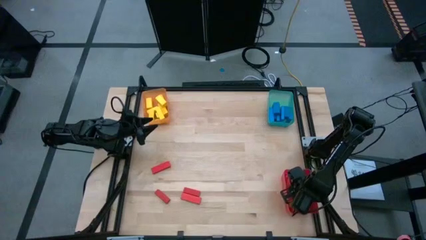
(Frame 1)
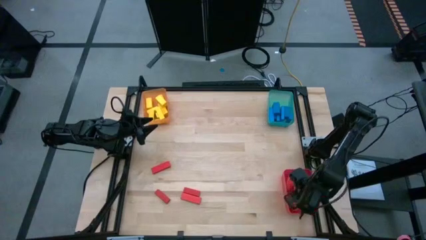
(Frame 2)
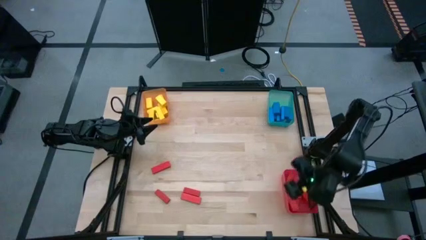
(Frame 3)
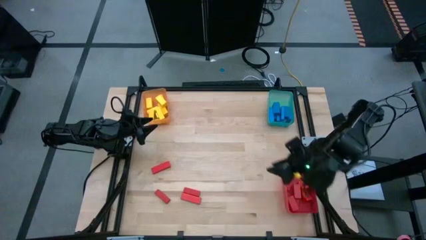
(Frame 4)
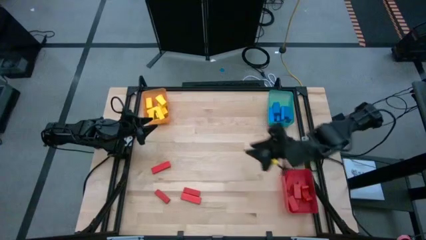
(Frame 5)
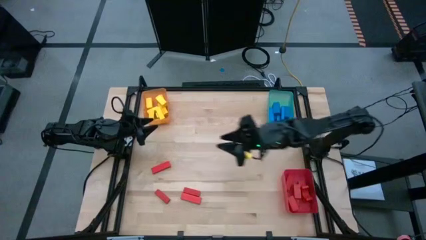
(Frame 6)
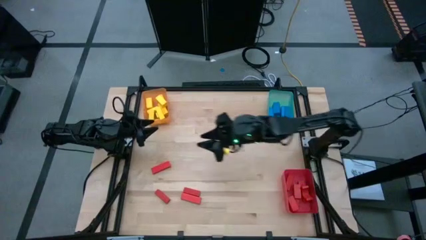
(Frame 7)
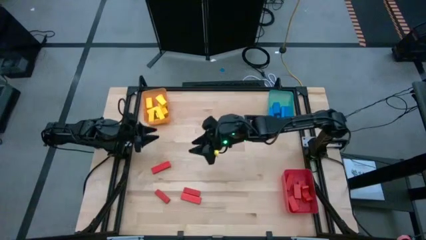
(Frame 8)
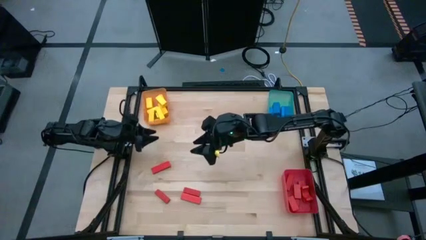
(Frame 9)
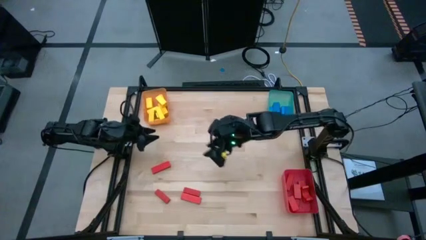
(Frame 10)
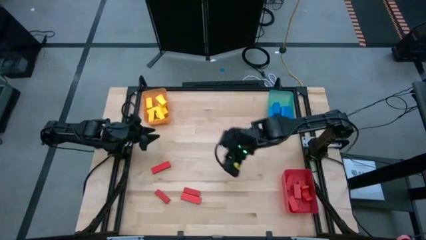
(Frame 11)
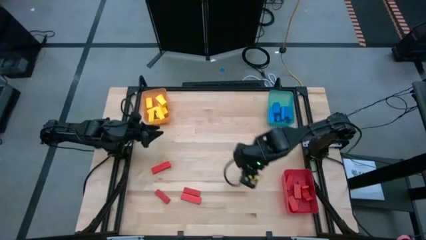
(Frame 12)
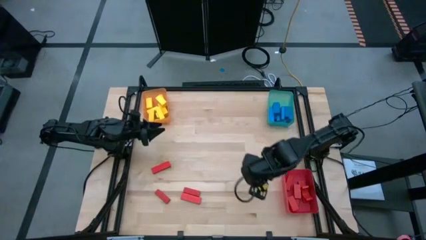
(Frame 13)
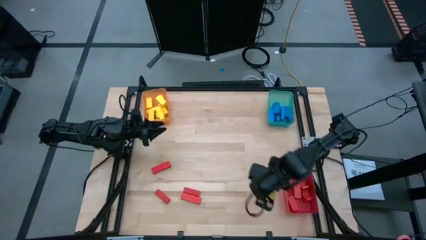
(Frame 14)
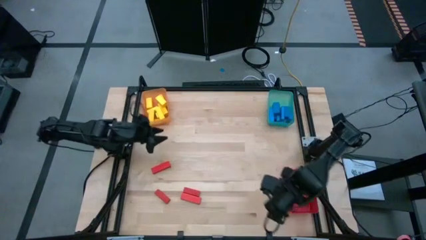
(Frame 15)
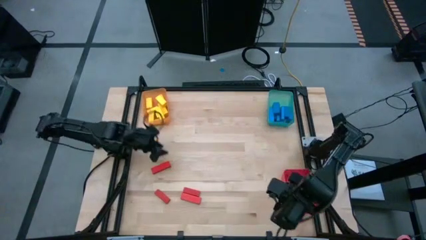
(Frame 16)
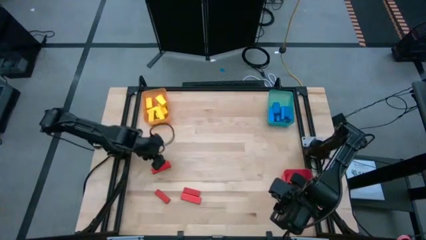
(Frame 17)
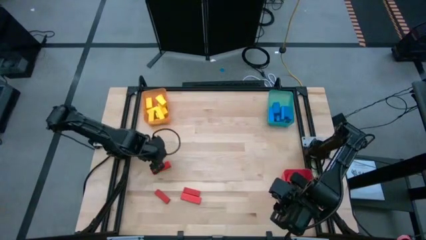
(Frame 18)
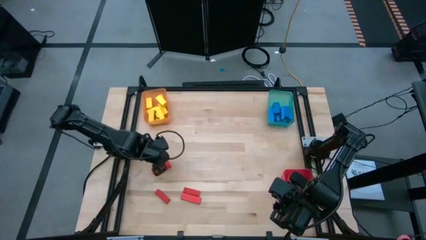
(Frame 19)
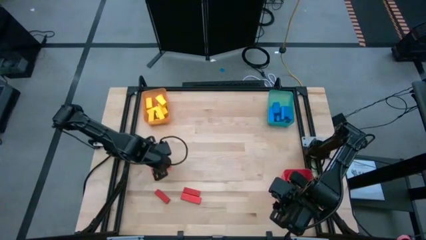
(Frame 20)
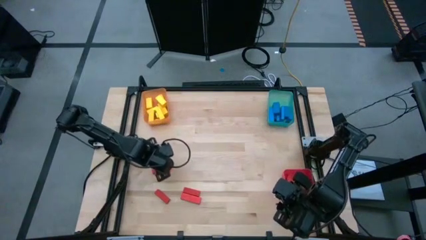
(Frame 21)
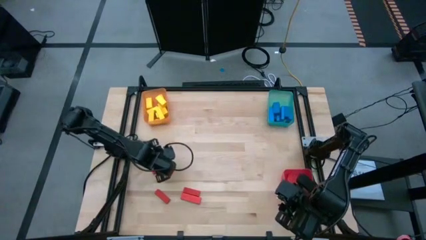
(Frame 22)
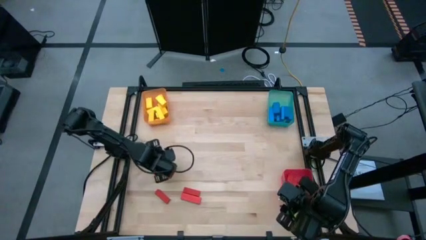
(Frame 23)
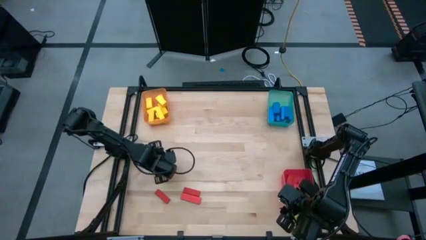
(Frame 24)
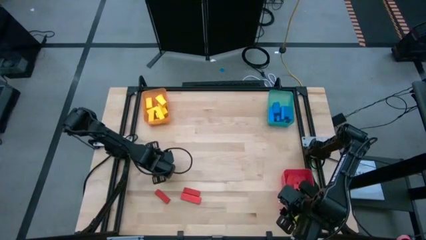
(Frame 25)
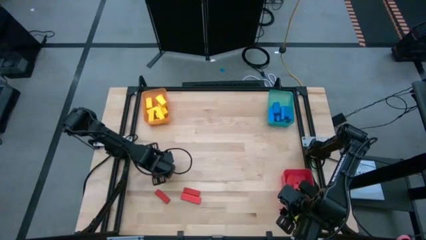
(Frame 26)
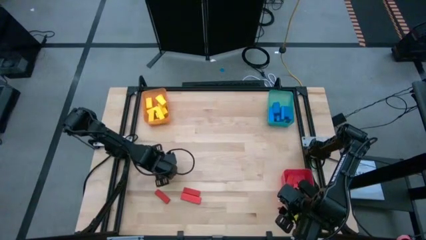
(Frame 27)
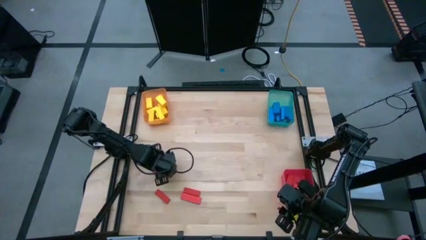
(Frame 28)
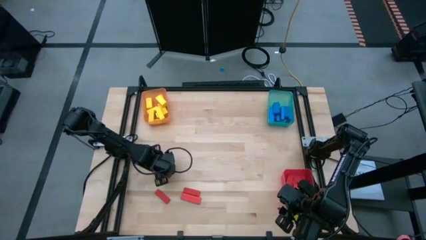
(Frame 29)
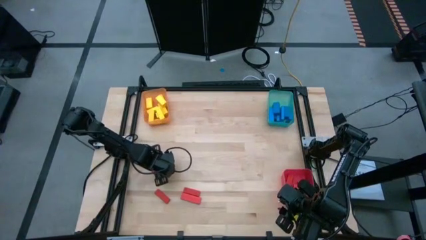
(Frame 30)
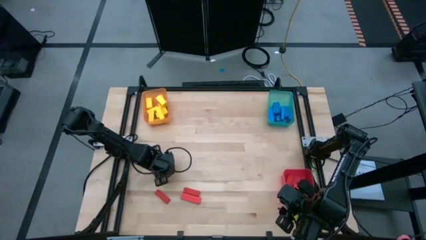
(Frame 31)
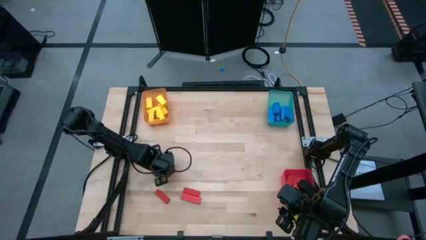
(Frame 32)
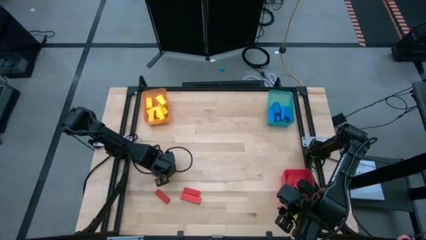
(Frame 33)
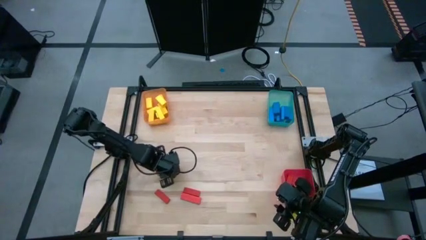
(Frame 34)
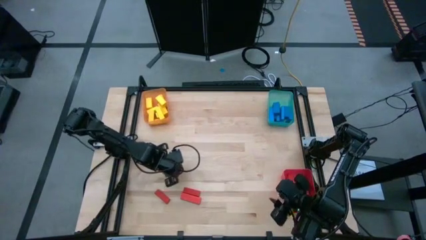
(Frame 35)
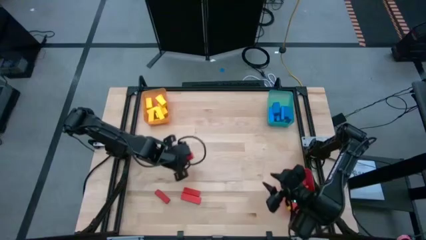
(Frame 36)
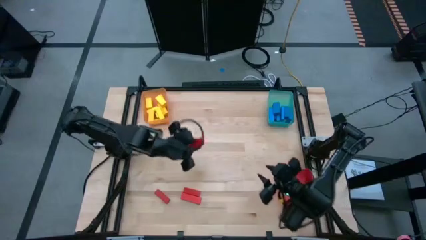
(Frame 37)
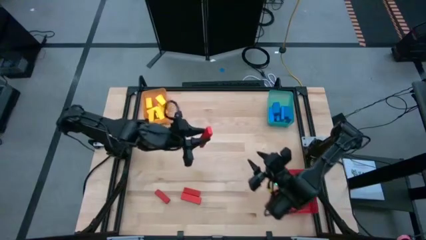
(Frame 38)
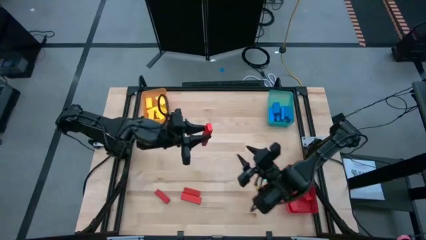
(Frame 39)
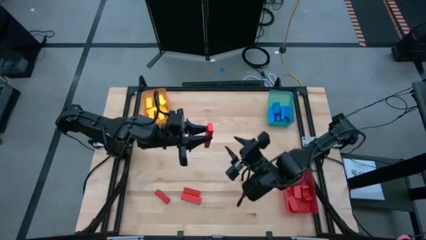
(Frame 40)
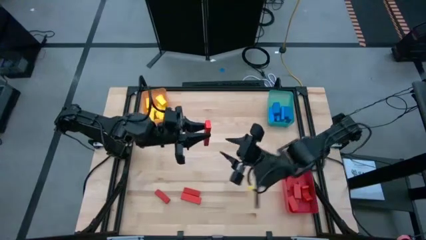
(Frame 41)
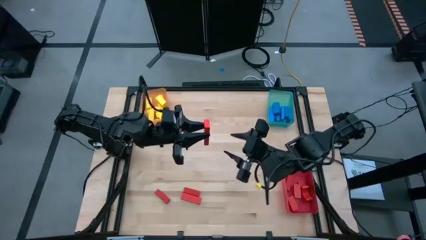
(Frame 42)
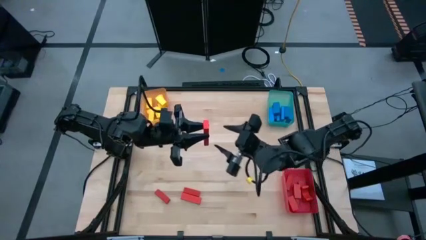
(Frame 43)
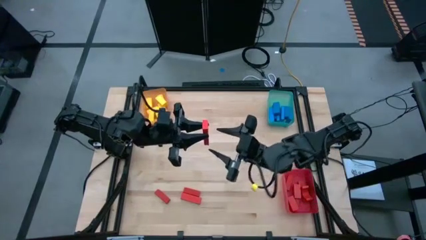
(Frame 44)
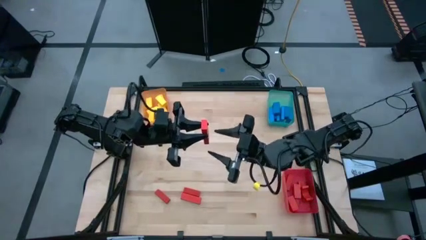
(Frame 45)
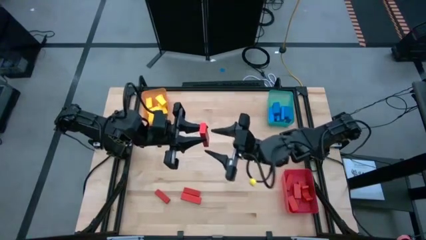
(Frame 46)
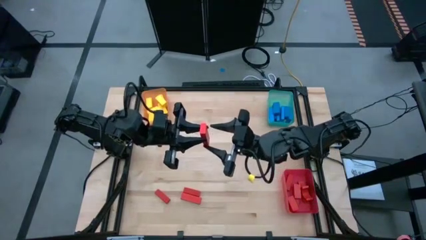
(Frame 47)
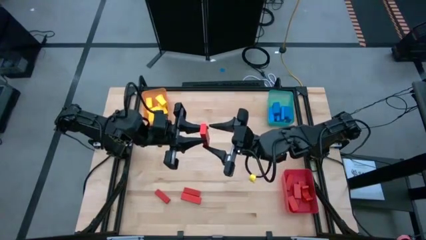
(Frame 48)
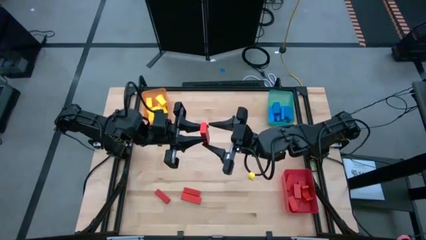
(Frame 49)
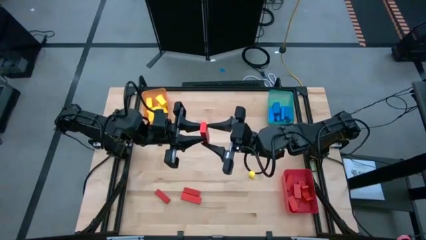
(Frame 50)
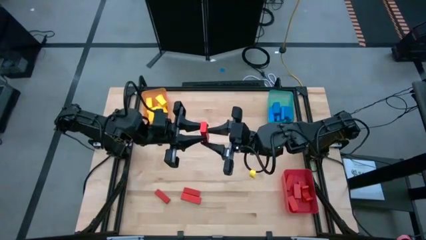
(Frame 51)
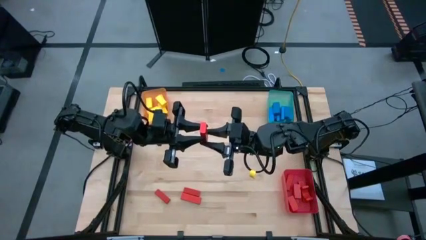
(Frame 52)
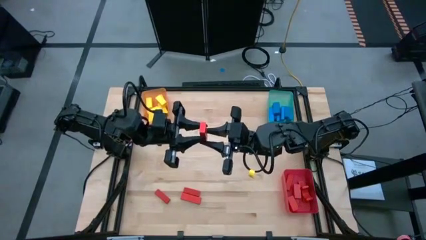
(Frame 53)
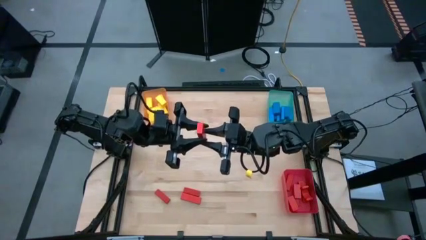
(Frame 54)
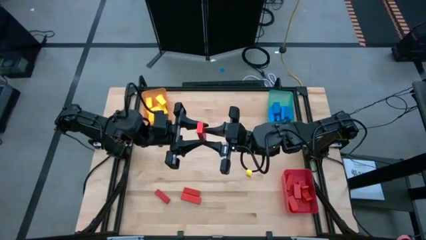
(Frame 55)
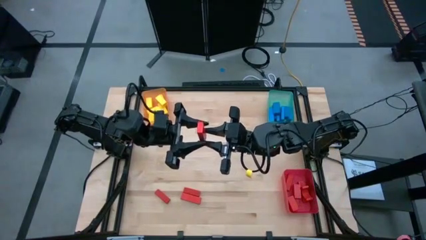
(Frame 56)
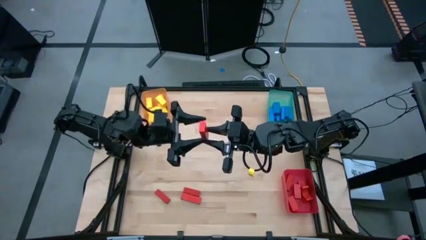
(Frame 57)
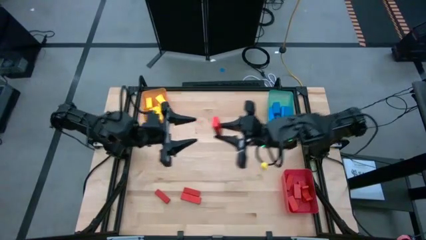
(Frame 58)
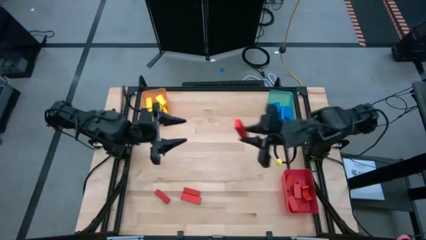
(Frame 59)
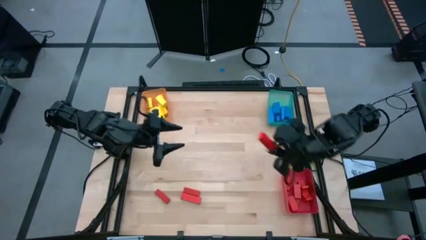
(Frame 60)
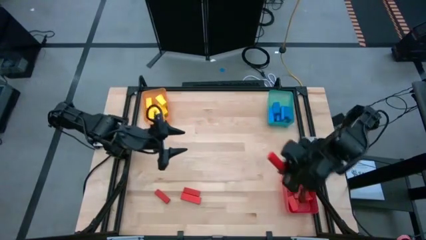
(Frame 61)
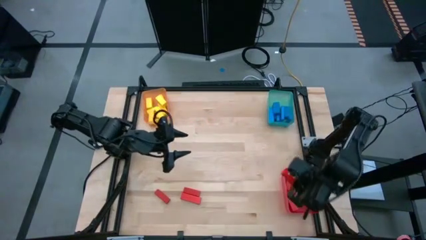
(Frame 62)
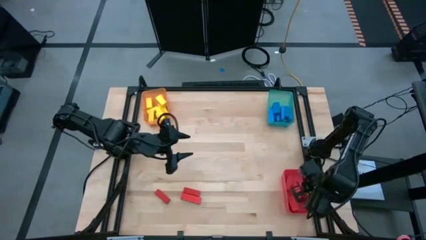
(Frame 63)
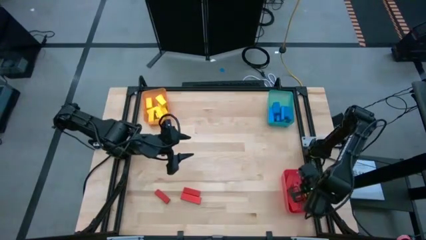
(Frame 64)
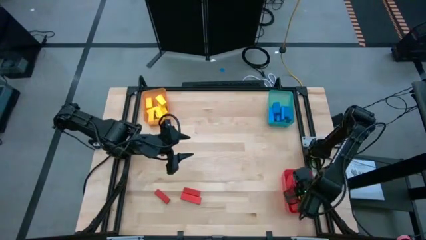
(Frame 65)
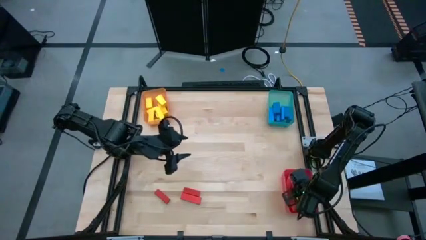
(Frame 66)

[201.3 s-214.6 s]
Task: Sort blocks
Put the red block into the red bin
